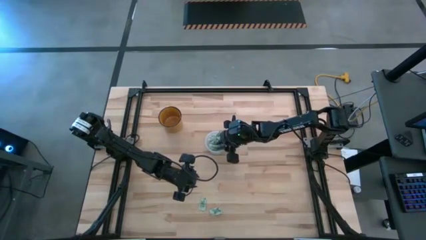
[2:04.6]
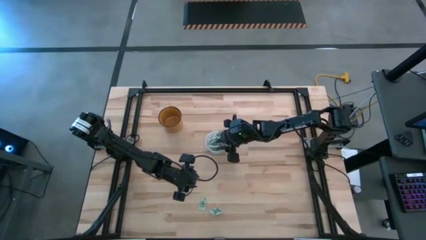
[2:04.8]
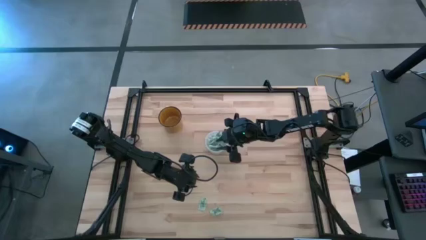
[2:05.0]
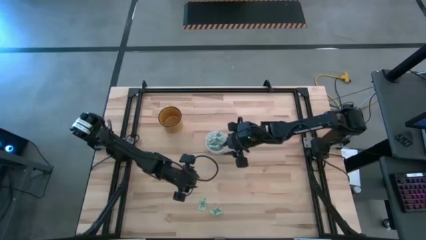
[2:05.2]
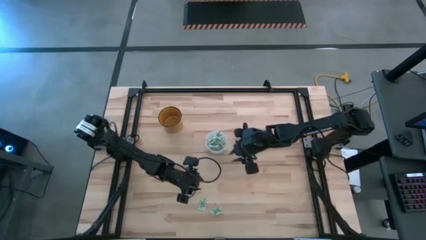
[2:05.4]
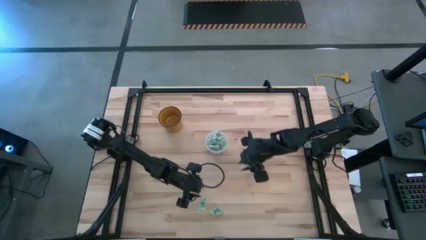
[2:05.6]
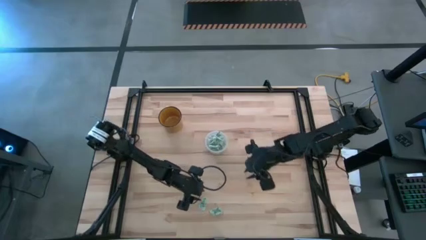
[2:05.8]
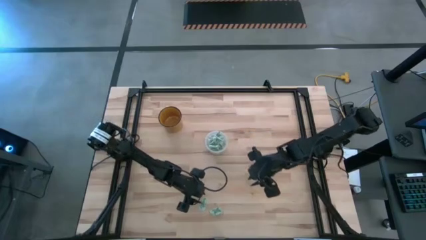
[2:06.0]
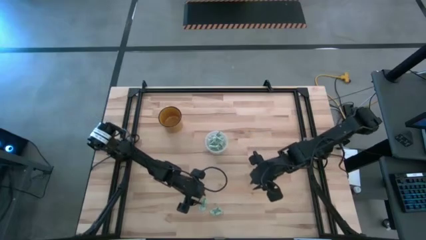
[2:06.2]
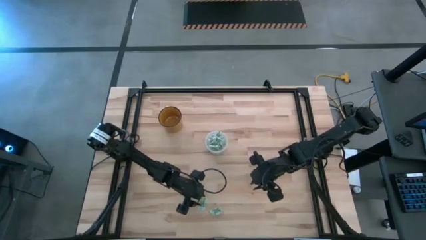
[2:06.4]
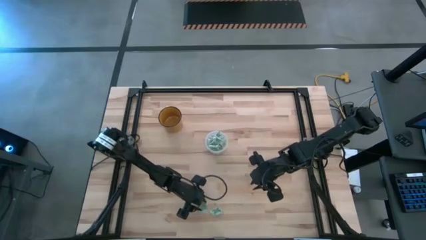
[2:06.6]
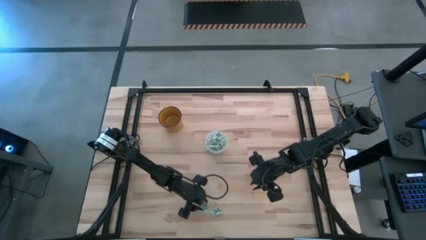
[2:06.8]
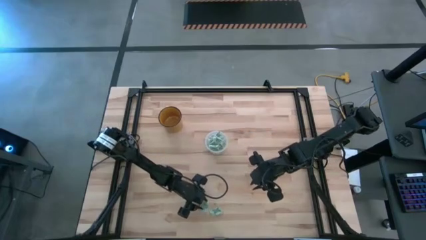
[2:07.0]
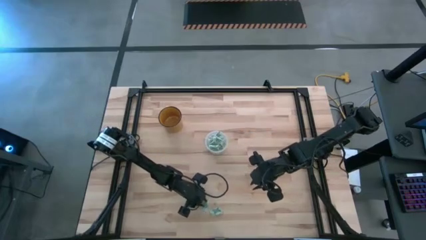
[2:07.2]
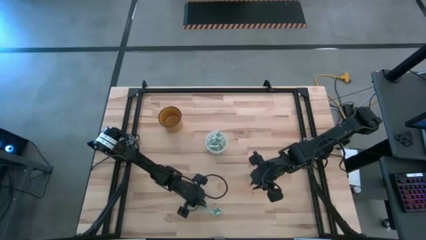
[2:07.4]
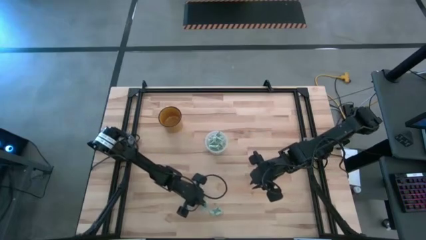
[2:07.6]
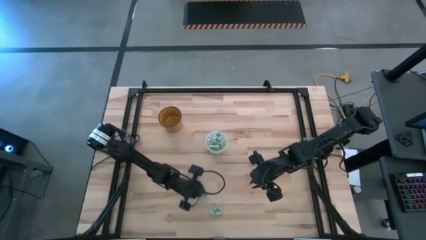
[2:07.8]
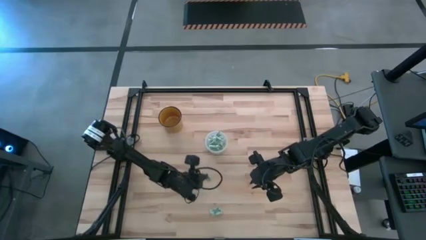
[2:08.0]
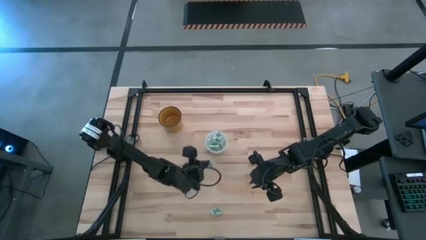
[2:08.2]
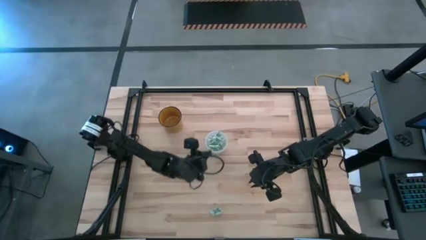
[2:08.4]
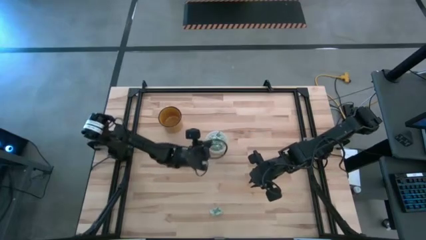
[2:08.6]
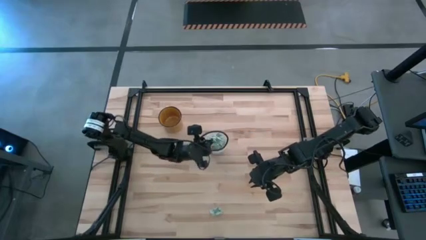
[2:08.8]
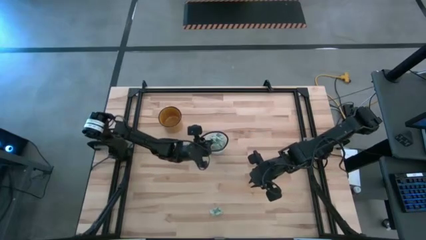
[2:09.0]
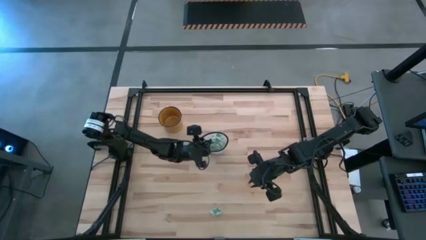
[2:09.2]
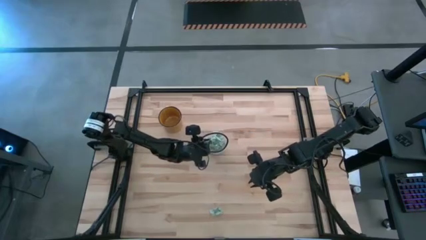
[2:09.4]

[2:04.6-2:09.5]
Task: Pick and place Stevia / Truvia into bins
Put the left stevia packet into the transparent container

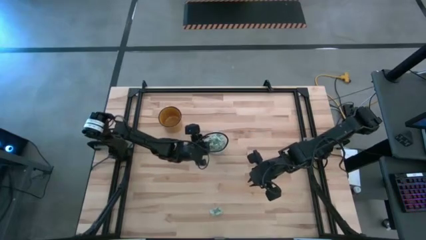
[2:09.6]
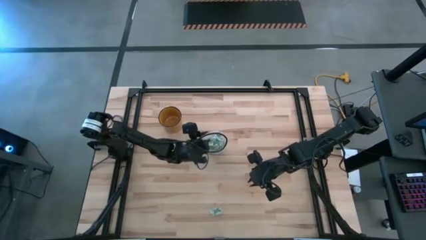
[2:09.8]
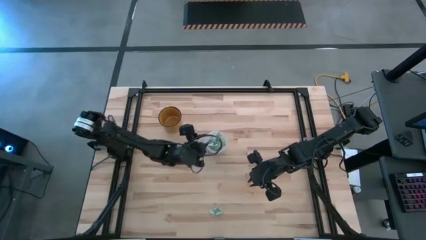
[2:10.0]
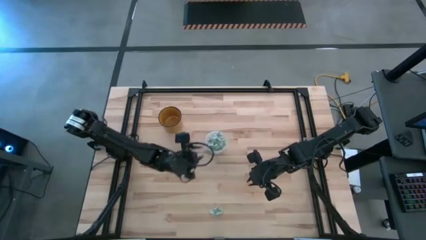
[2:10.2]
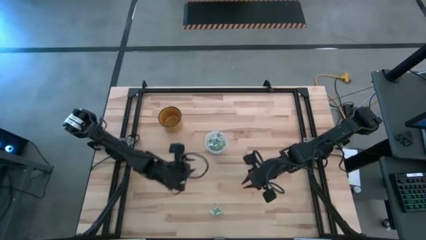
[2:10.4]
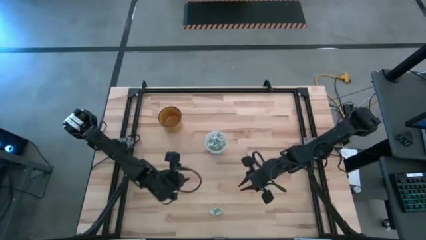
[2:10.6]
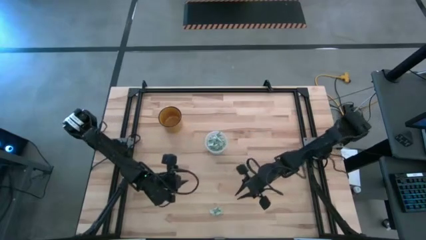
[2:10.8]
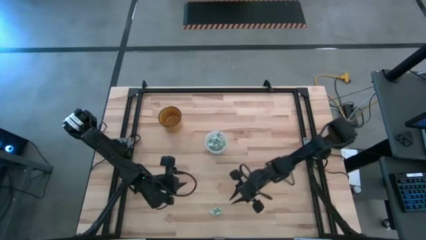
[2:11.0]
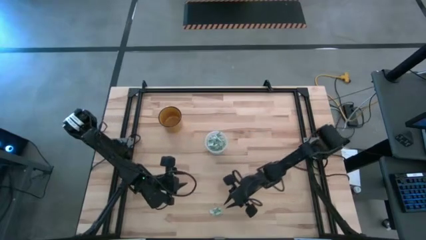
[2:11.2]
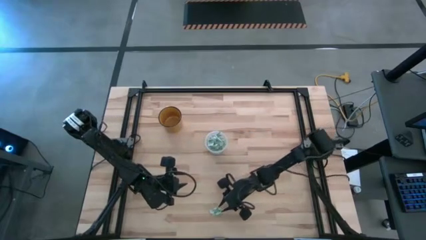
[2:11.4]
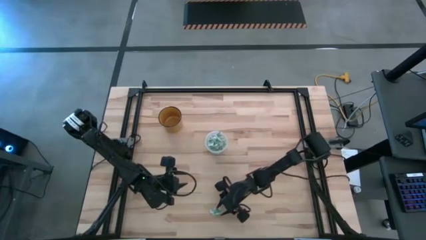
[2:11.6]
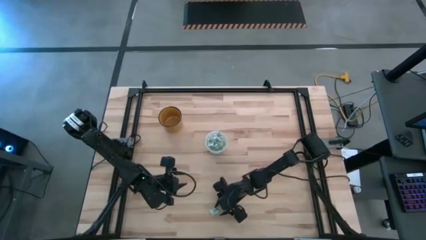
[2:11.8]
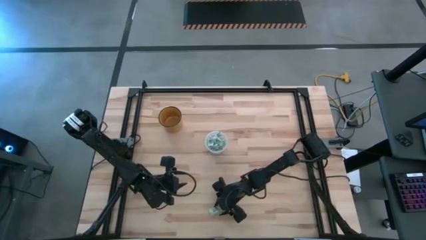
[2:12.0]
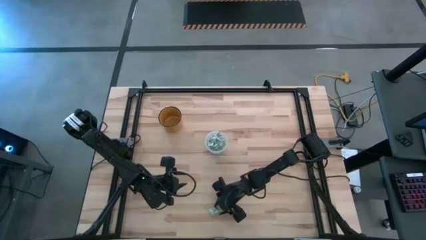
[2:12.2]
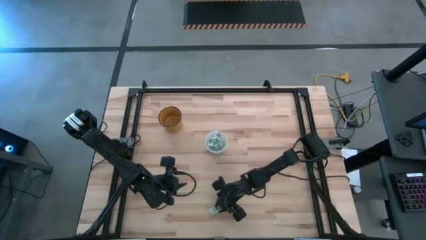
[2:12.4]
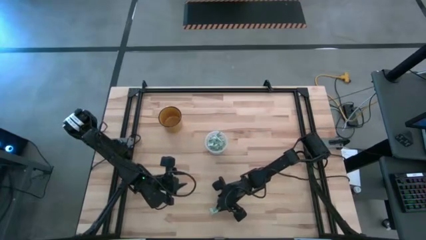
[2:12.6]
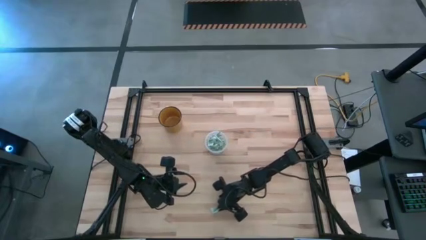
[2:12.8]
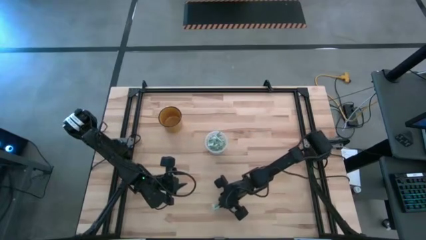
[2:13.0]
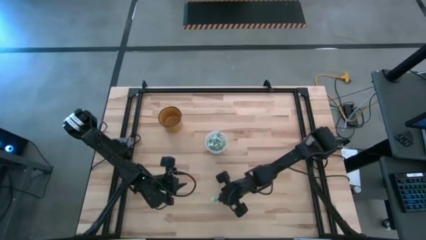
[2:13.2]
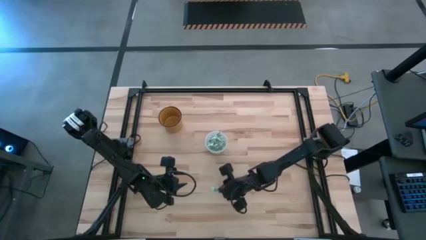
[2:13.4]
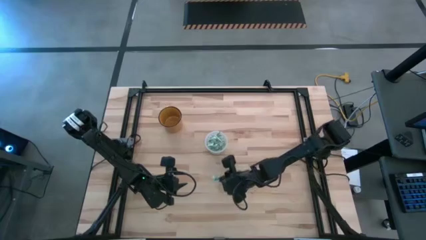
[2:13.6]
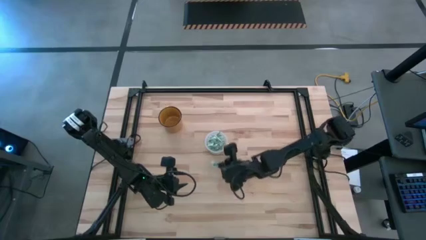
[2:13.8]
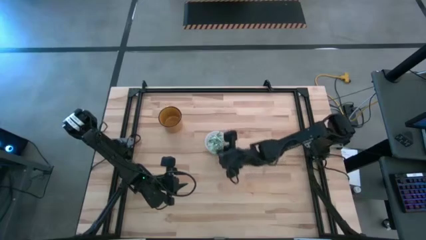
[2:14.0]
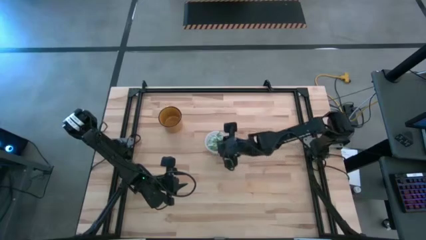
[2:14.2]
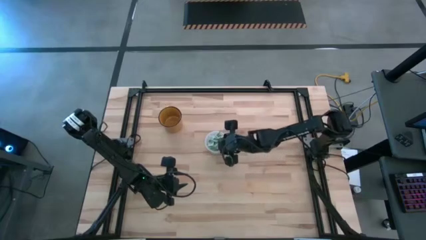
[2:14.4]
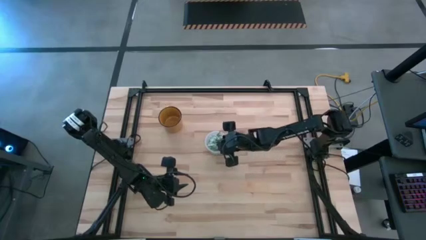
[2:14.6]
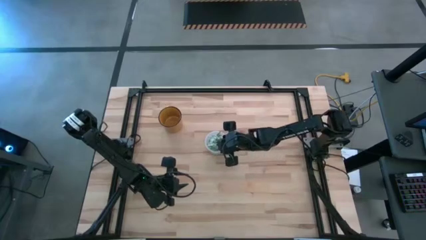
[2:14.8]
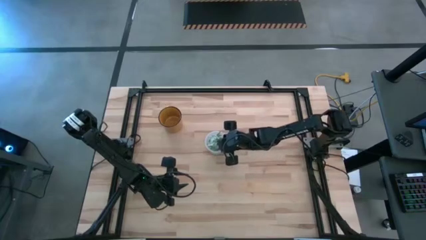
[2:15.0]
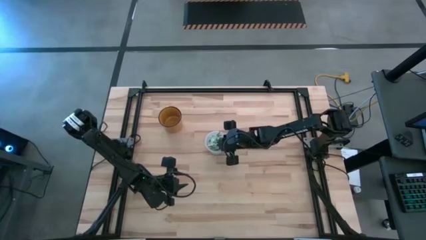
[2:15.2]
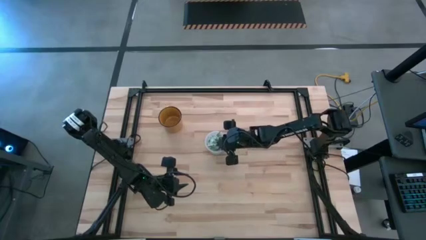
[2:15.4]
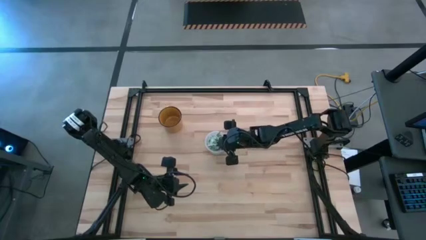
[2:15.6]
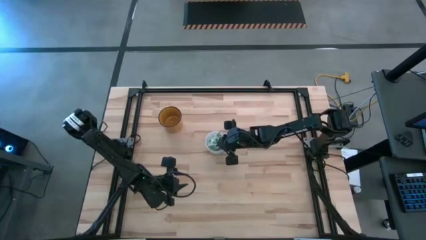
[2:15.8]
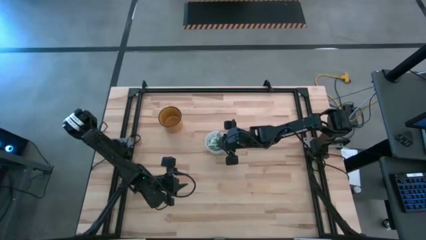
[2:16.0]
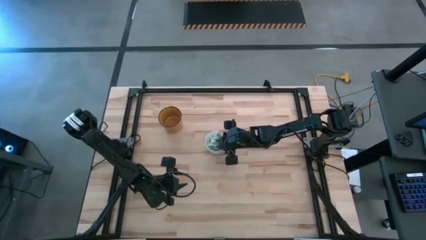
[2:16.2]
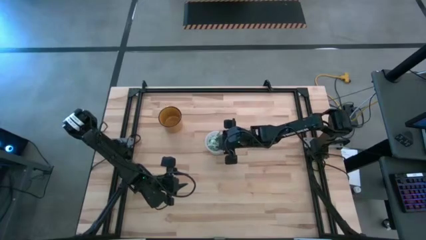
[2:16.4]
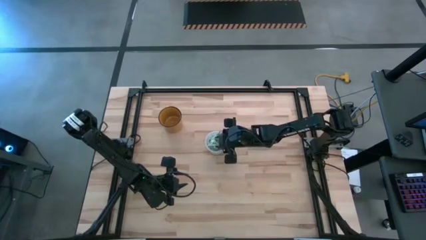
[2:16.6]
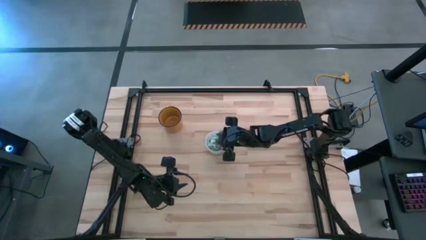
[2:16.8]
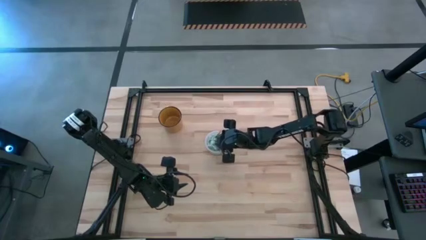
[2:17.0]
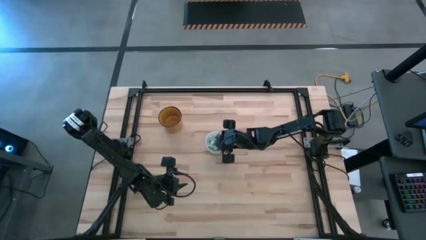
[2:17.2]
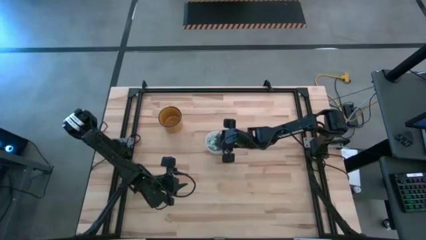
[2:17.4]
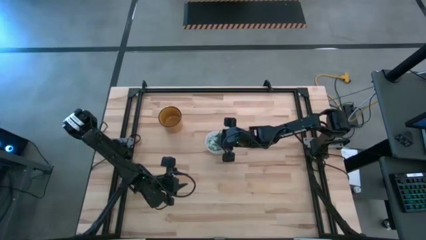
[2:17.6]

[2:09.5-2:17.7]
Put the stevia packet into the transparent container

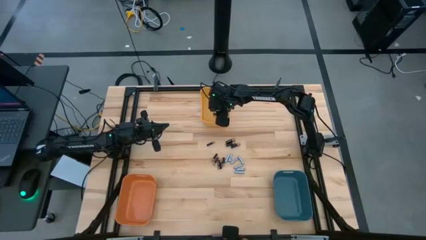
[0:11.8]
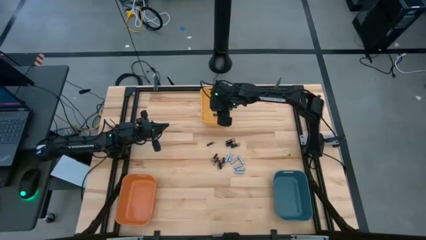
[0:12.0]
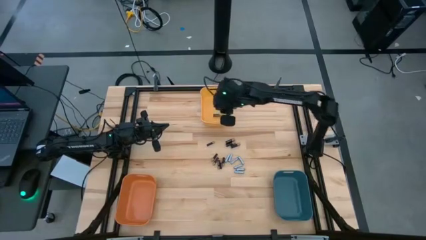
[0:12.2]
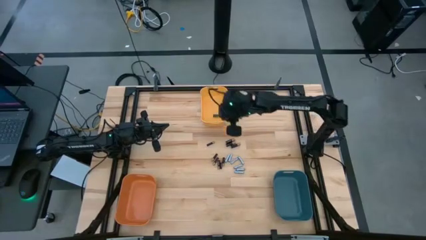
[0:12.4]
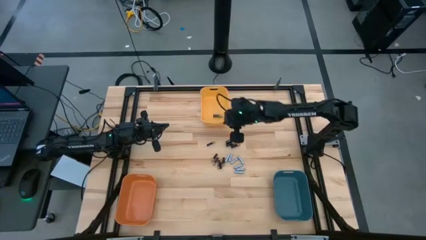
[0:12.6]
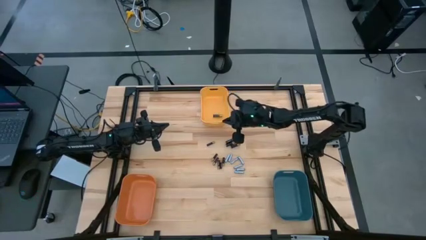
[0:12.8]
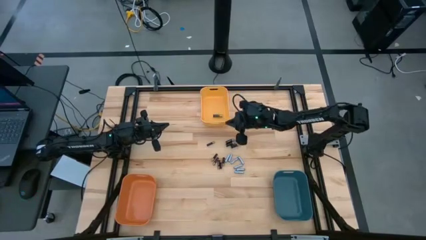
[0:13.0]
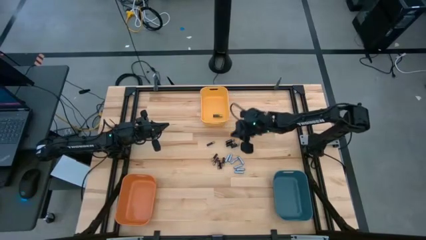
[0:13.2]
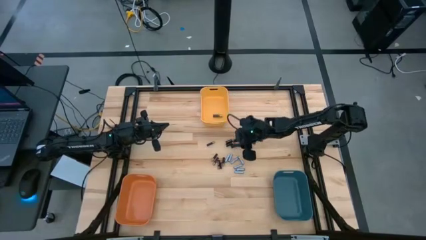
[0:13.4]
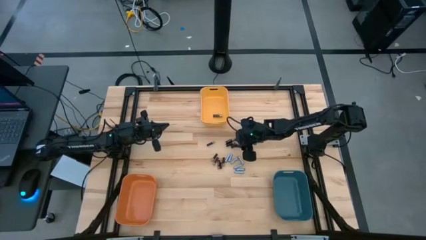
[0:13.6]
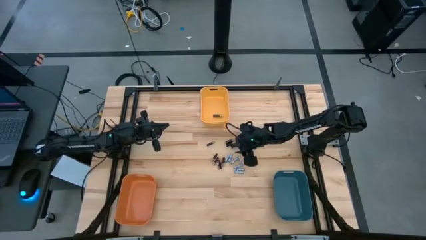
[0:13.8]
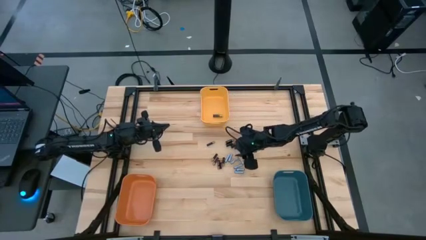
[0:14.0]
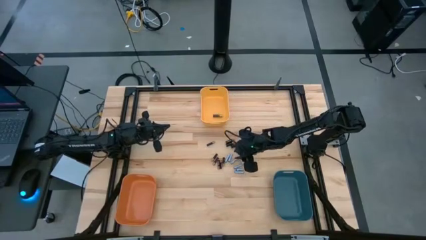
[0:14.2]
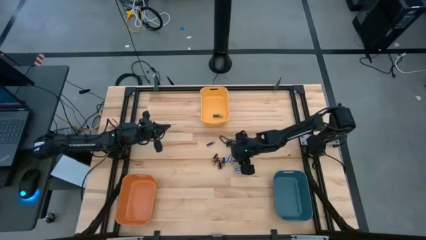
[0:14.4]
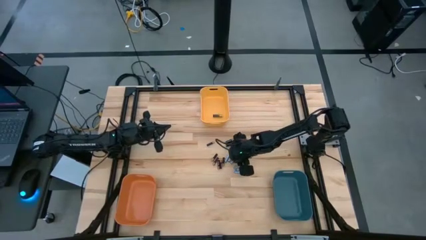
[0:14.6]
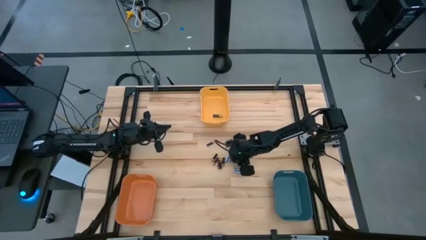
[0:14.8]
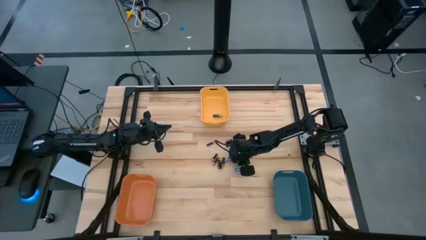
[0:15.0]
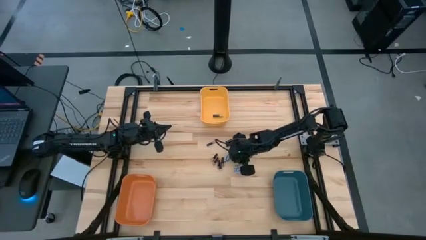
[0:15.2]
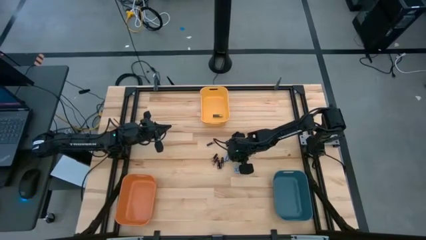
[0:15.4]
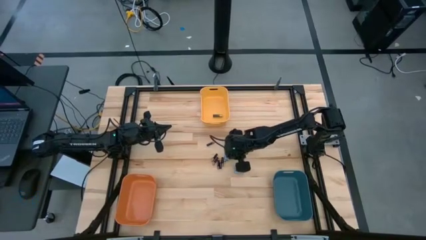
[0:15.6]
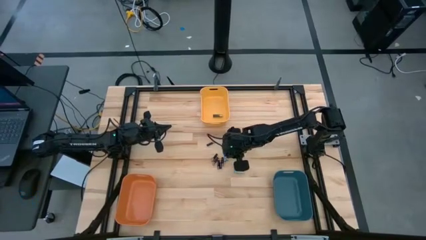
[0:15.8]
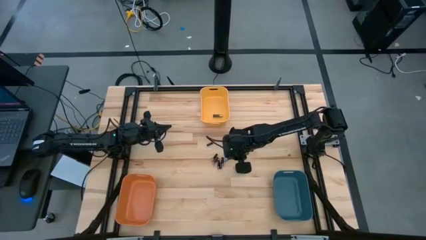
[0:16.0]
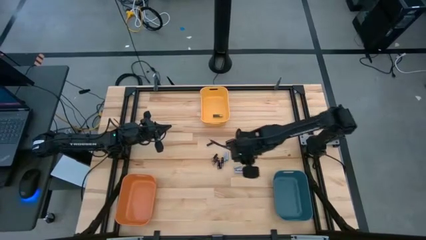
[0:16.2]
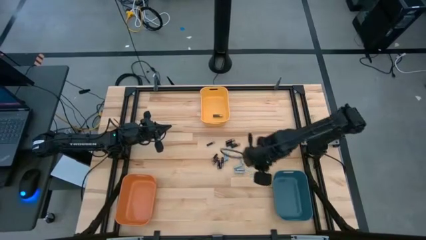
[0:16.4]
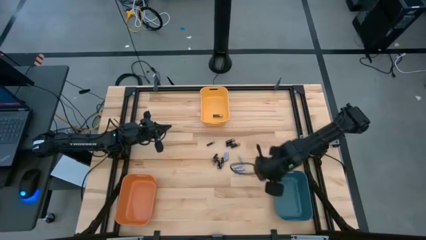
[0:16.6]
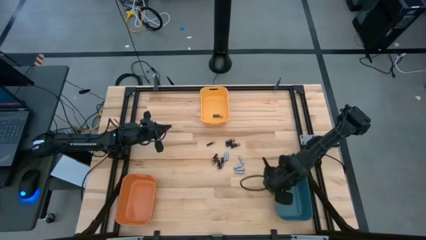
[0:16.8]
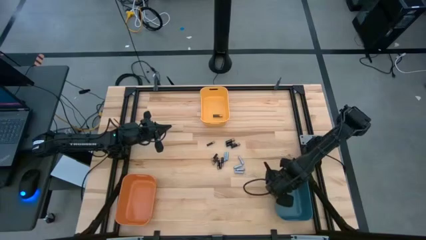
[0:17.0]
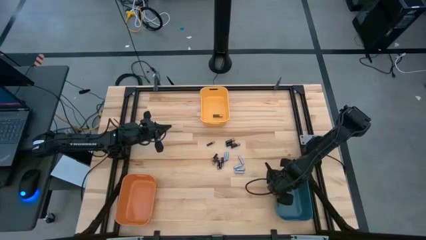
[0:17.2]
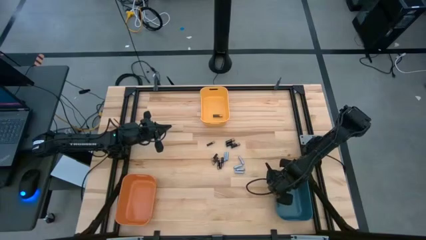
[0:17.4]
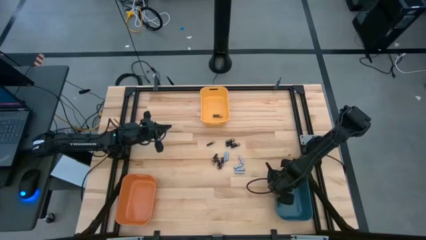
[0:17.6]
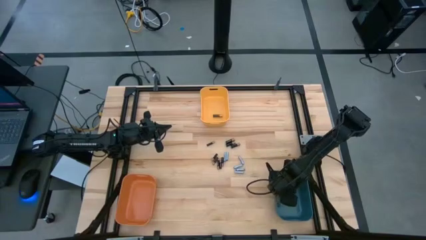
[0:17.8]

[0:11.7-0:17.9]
Task: Sort batteries
Put the white battery into the blue bin
